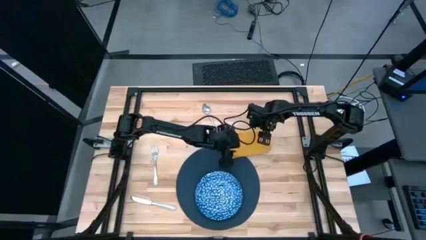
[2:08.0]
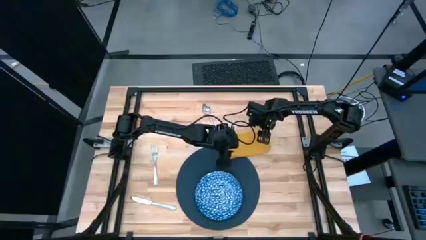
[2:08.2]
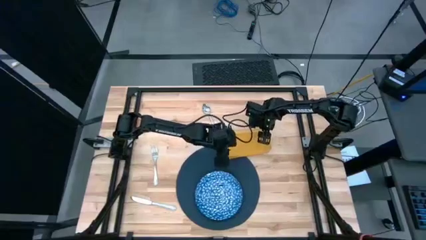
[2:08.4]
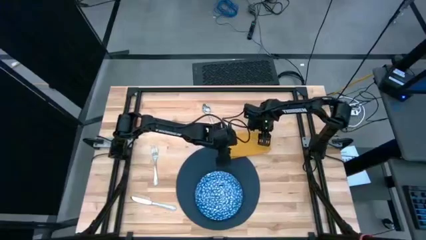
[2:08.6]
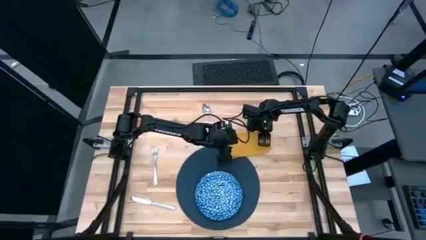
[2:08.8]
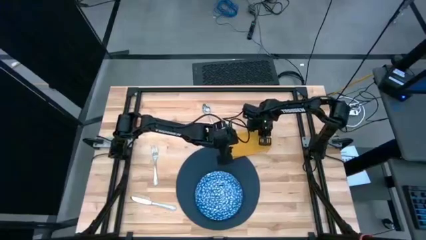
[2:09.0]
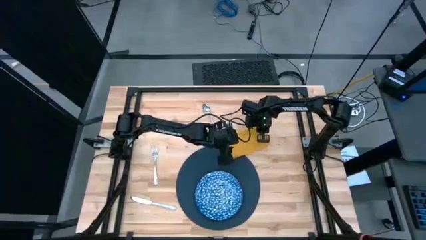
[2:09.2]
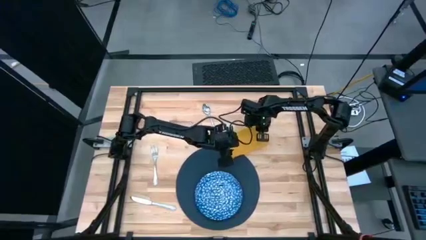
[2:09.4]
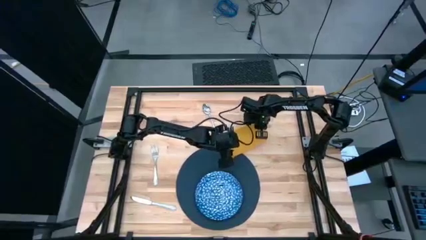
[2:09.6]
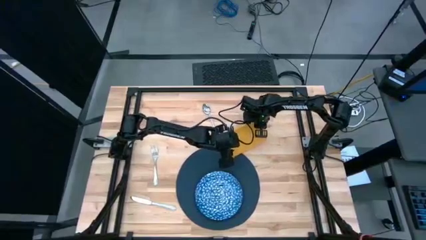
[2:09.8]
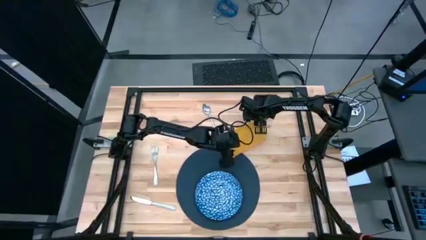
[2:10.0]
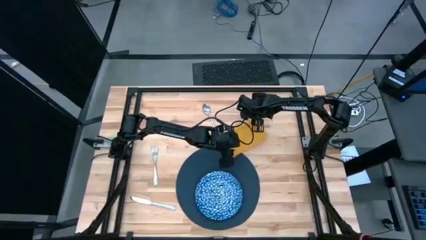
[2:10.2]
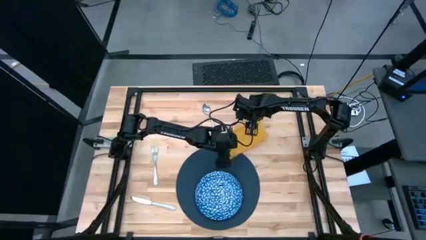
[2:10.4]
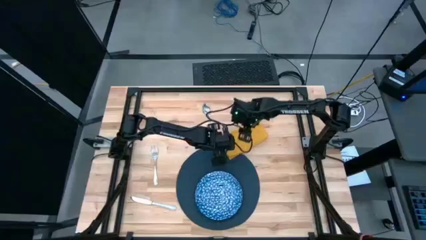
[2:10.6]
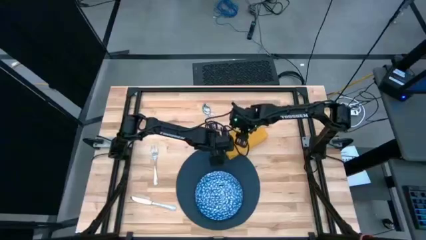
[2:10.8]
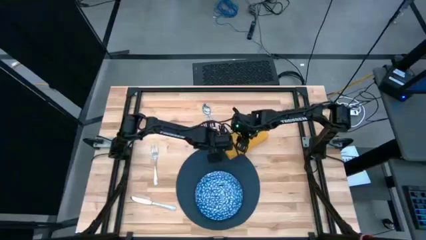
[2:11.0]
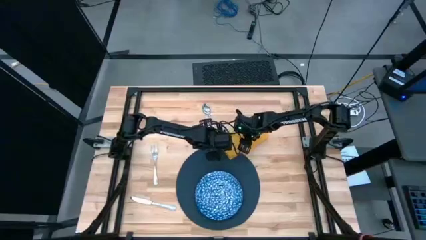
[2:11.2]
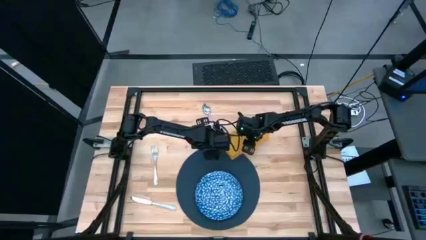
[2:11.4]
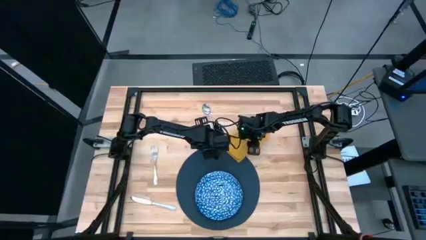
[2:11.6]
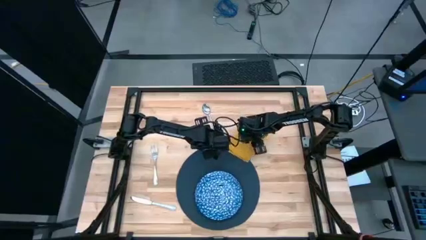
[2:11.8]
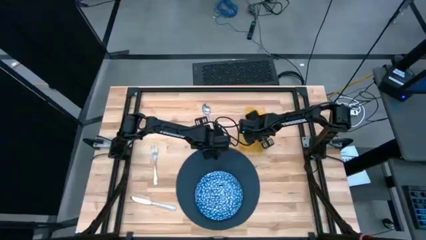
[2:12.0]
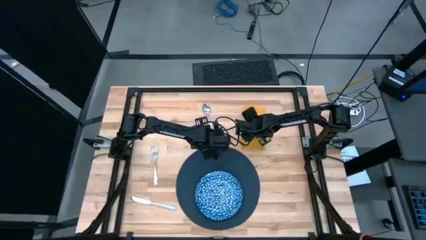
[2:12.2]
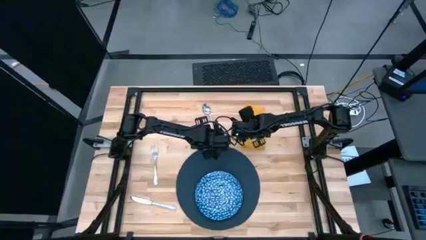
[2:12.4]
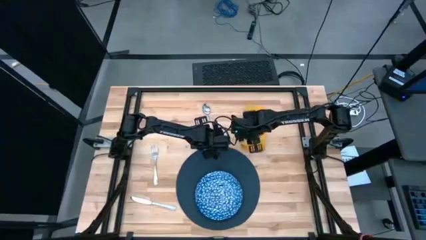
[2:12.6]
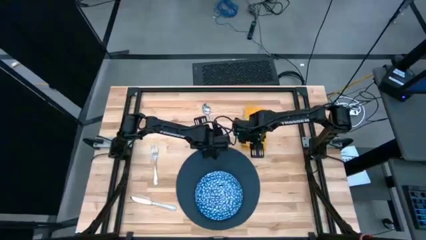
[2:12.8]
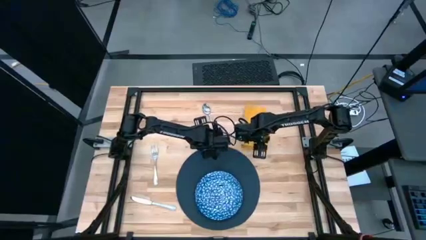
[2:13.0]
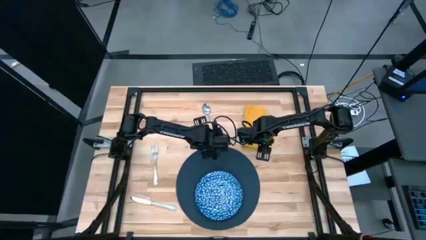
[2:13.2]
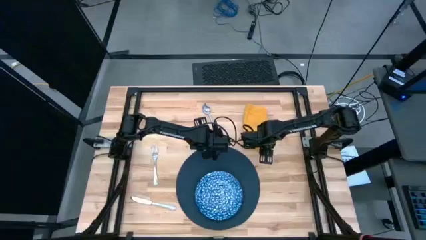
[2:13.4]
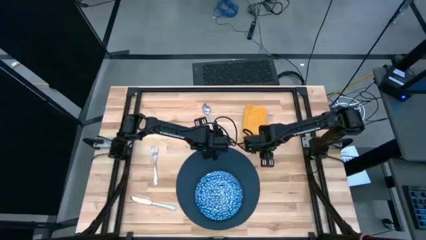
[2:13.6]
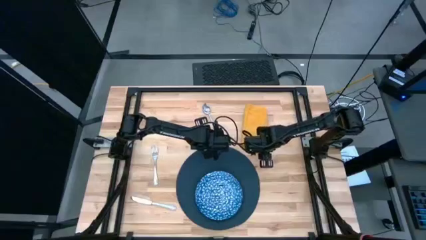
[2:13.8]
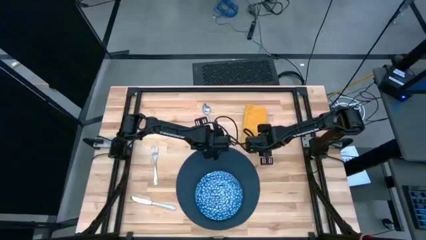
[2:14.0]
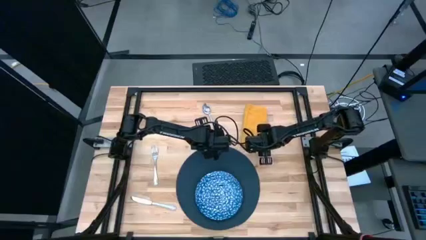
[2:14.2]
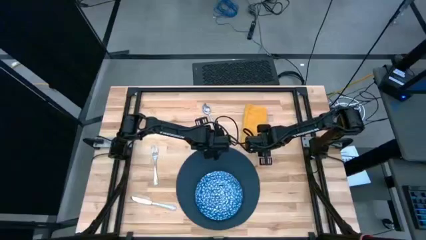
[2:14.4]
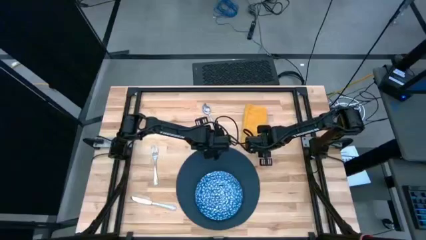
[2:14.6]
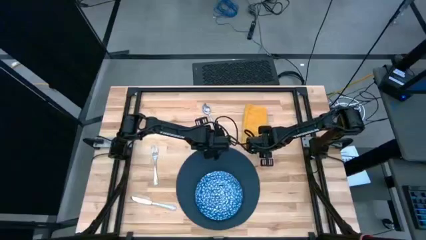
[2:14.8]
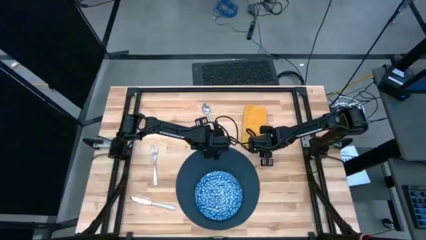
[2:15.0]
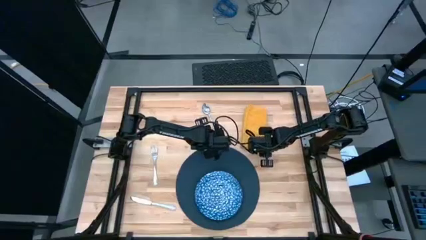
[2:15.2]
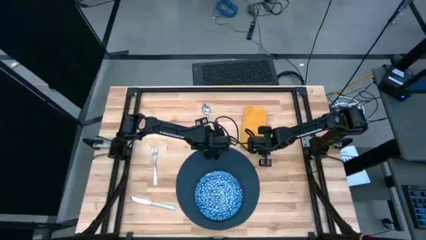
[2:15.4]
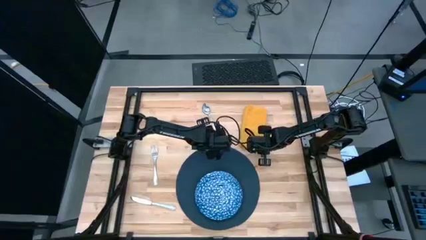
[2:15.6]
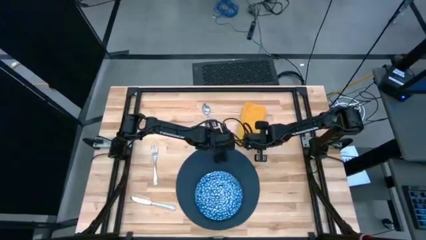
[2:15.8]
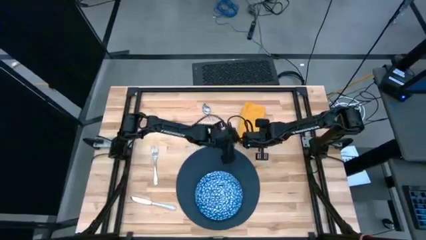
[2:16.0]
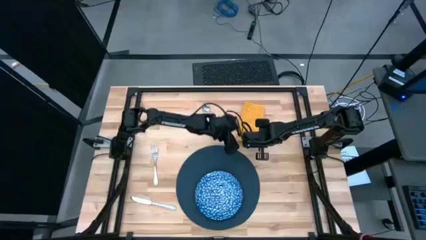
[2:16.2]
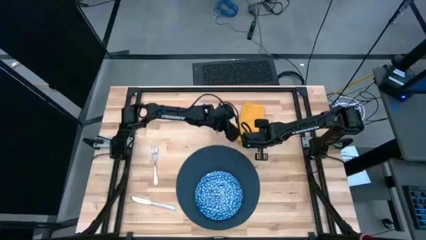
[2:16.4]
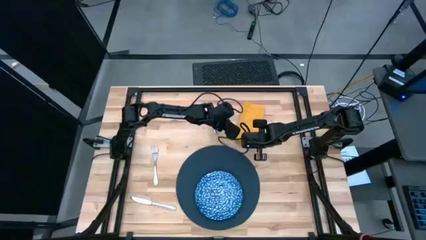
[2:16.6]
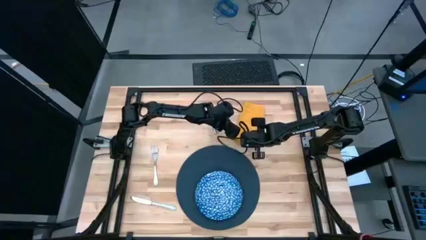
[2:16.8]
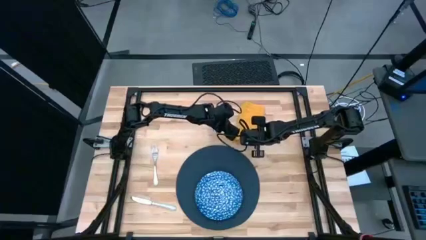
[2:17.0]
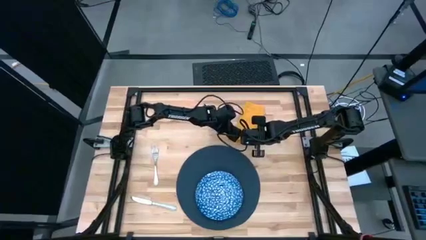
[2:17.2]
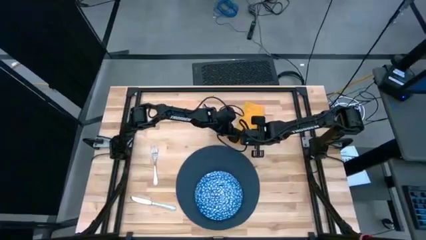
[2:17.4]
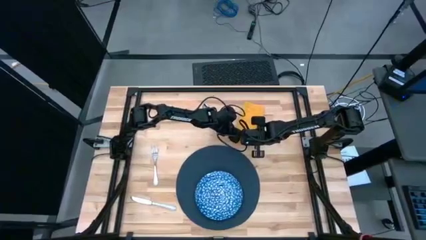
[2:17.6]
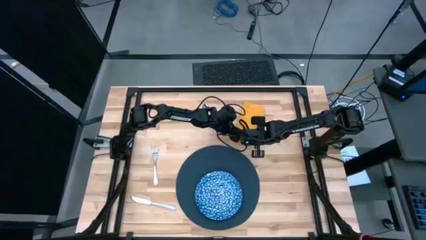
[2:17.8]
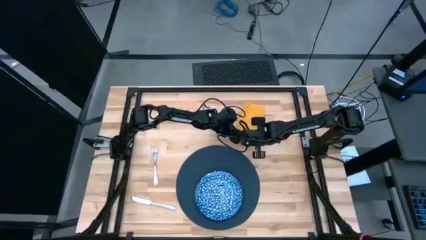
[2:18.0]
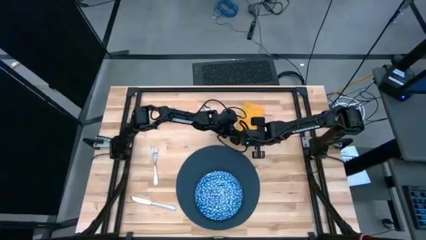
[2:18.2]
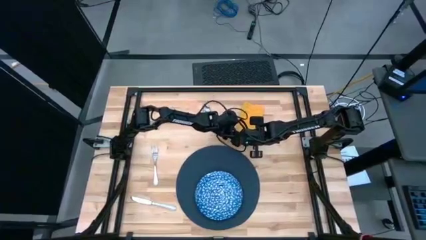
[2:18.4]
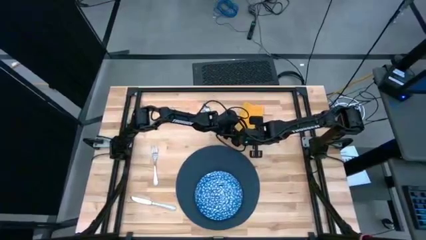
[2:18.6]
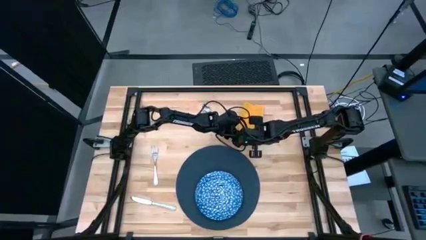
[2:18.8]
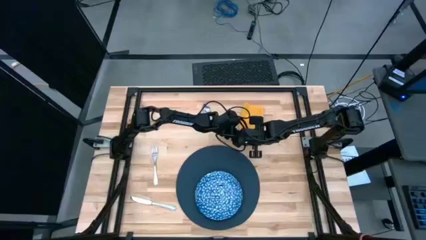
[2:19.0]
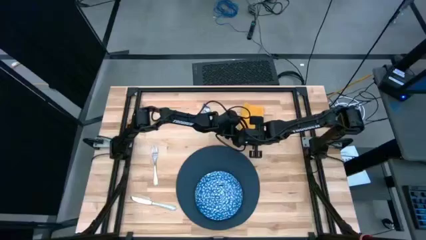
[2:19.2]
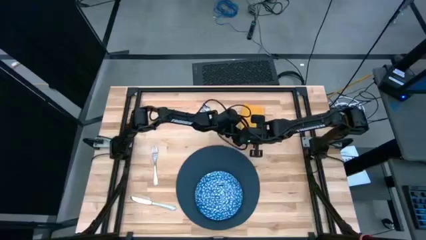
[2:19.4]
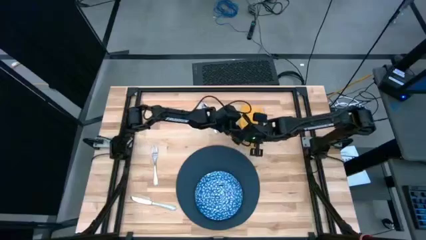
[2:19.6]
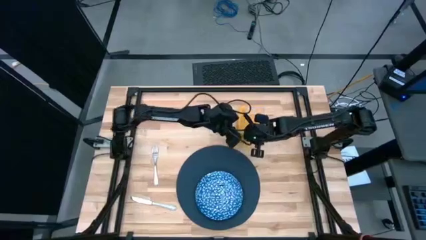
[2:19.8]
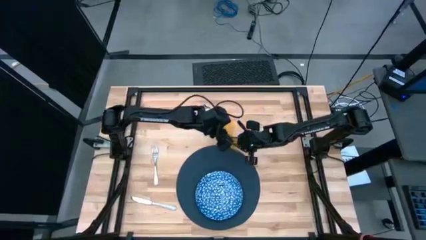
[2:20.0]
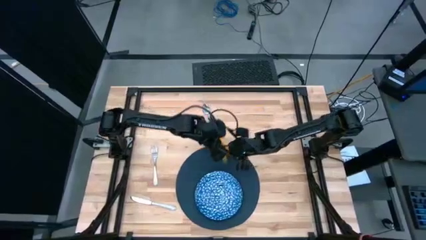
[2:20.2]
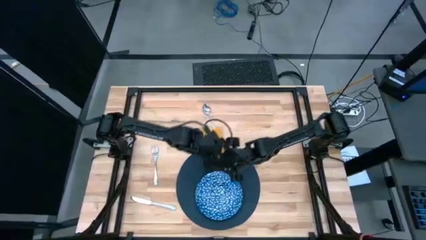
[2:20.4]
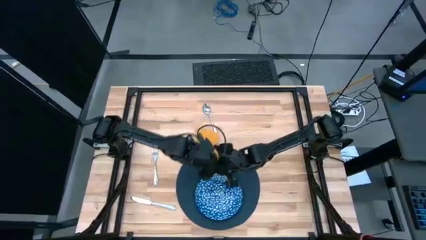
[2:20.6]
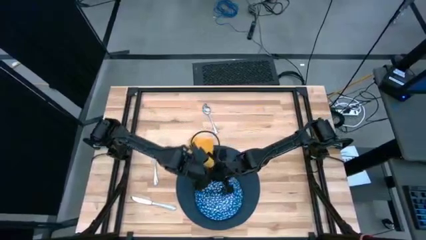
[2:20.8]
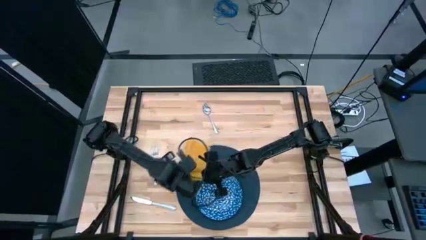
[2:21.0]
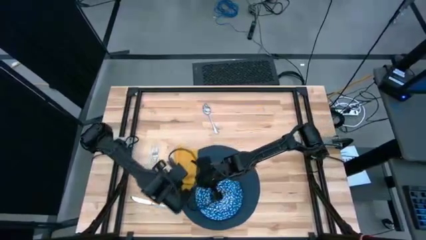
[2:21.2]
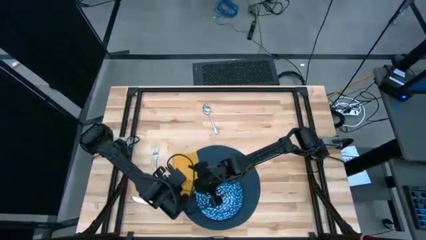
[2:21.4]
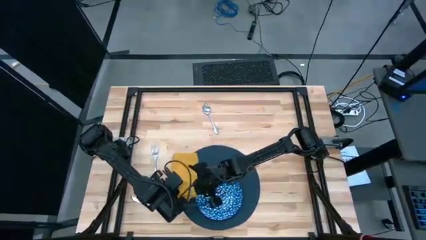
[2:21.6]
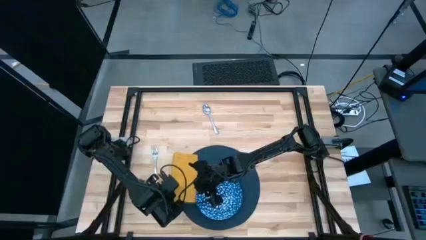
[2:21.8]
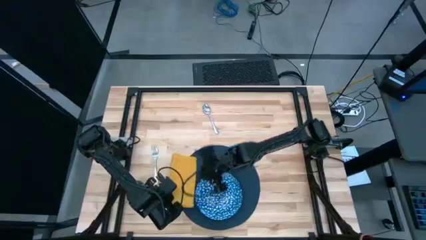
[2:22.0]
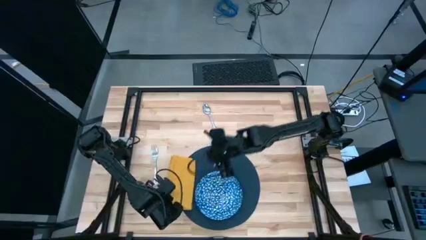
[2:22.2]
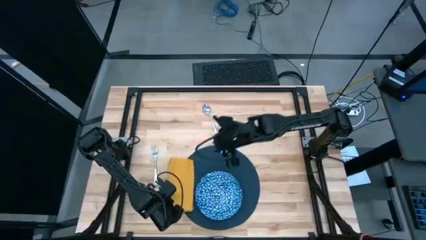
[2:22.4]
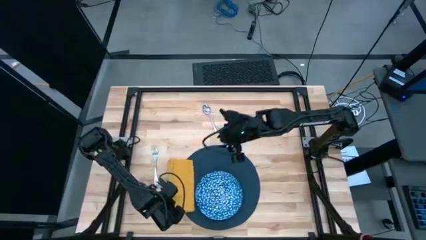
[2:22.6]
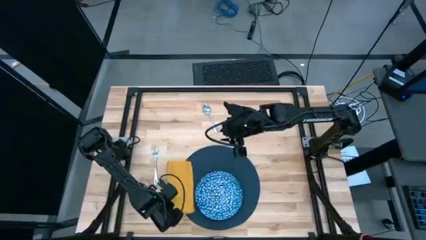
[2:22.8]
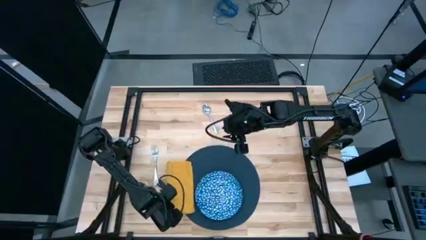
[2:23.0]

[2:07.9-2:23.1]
Task: Set table place
Put the yellow table napkin on the blue table mat to the left of the blue plate

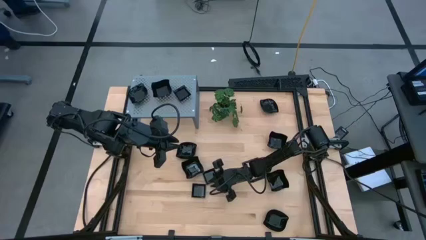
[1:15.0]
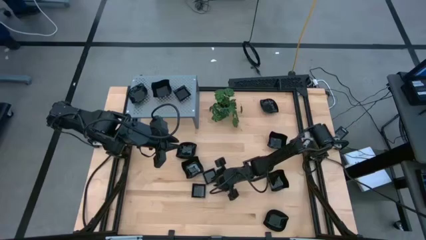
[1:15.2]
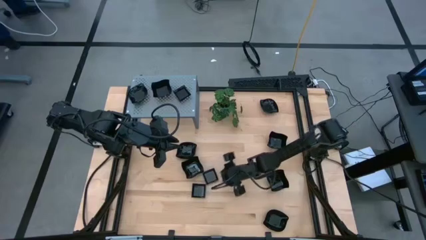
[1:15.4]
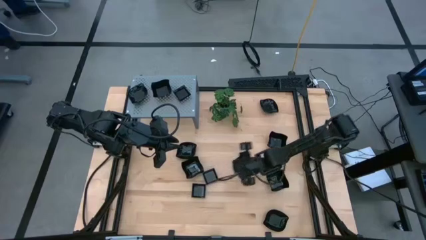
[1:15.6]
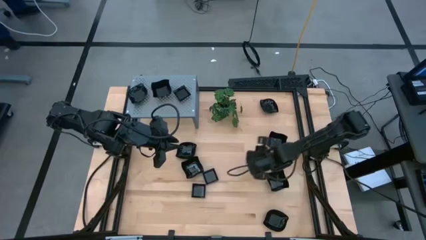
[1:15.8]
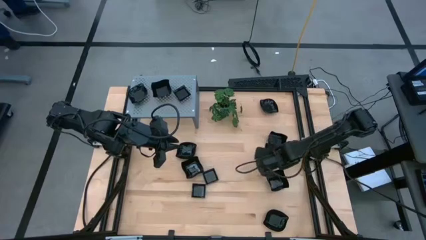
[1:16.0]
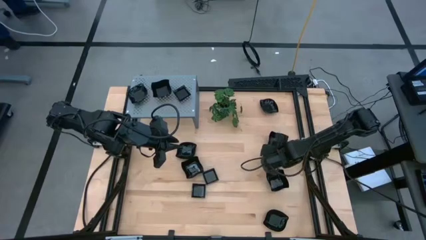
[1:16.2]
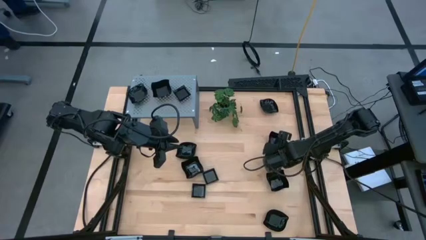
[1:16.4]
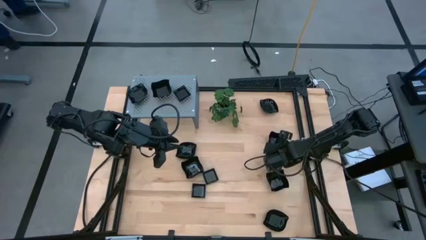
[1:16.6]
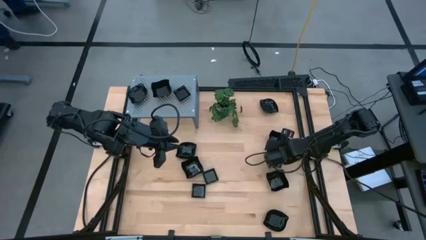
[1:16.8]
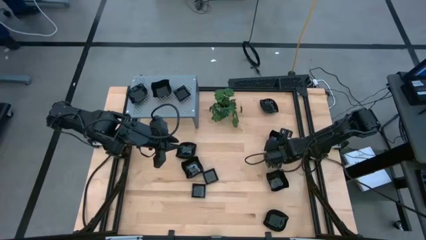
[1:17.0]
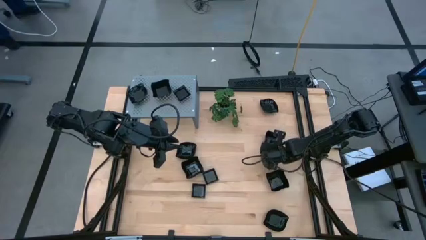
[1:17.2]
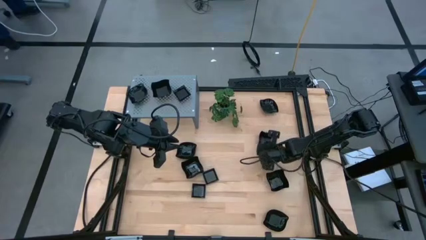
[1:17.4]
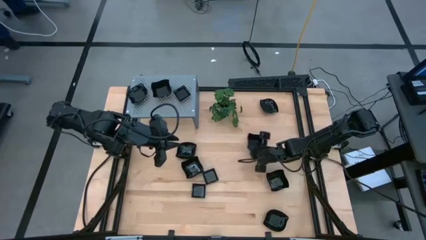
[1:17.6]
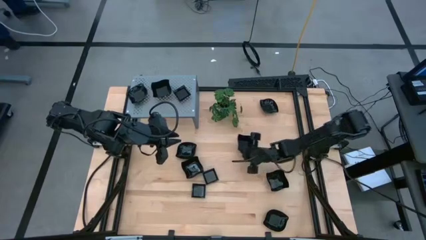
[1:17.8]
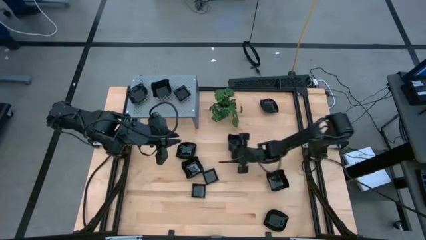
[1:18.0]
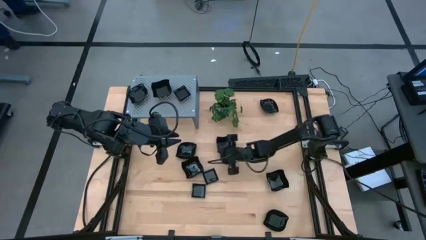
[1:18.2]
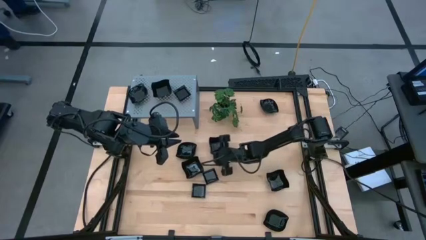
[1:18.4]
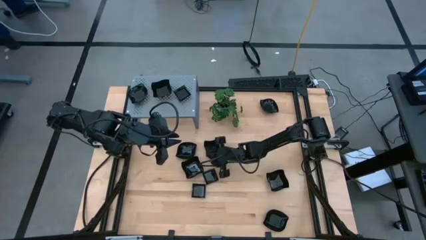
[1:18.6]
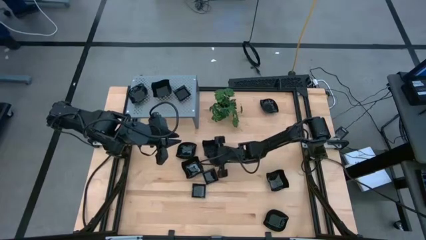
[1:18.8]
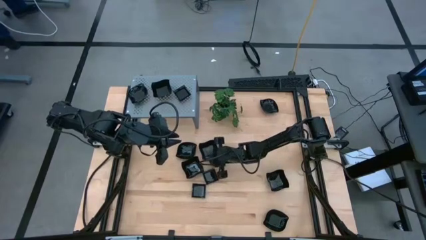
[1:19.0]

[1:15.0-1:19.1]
Task: Pick & Place Mini shaped plates
Move the black distorted square plate to the center of the table
